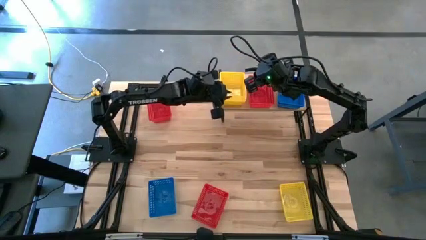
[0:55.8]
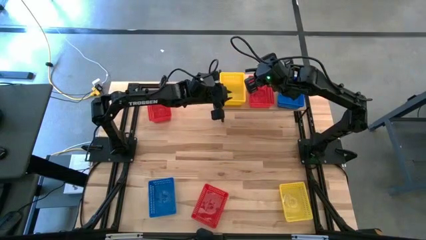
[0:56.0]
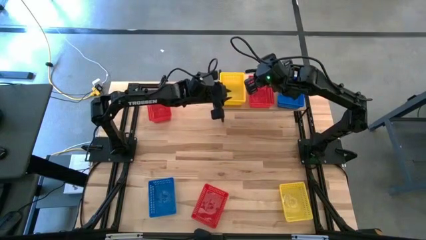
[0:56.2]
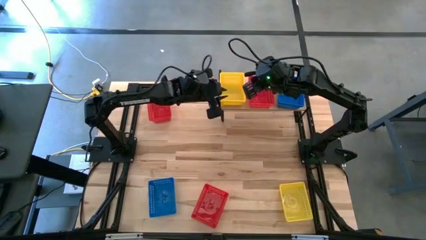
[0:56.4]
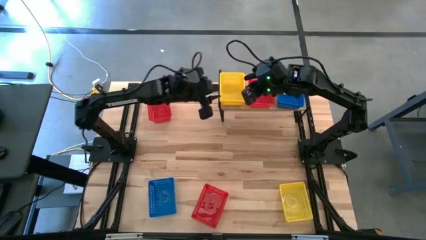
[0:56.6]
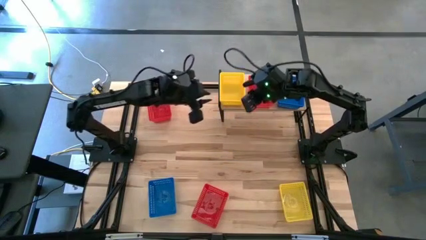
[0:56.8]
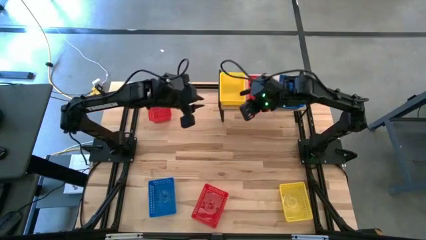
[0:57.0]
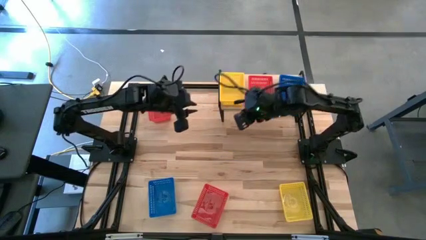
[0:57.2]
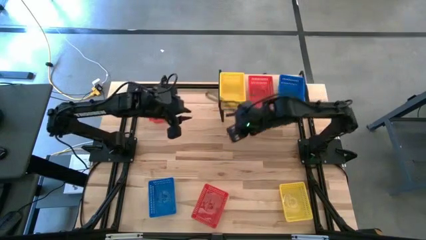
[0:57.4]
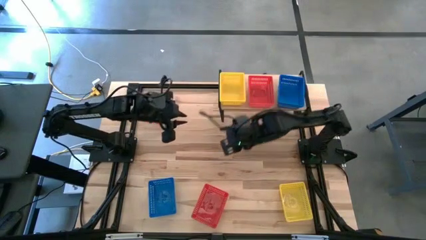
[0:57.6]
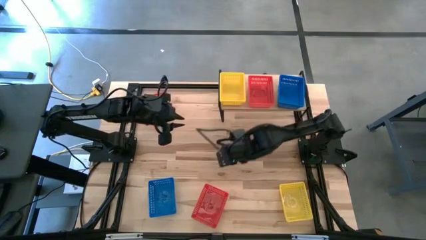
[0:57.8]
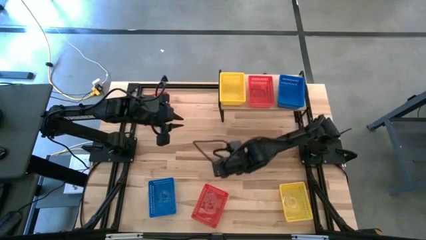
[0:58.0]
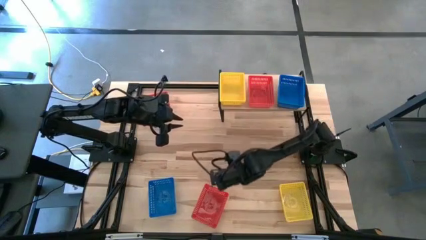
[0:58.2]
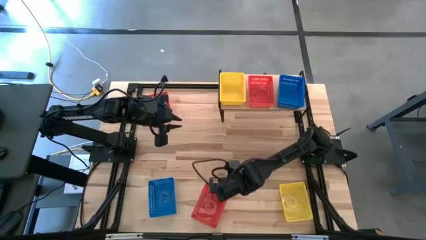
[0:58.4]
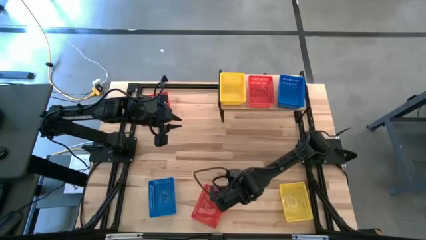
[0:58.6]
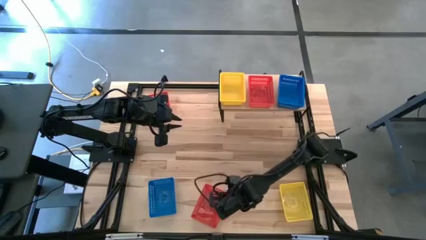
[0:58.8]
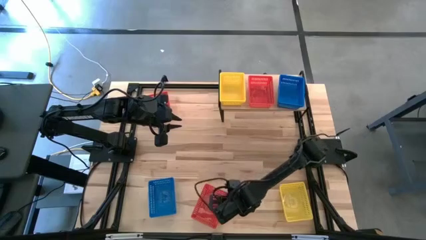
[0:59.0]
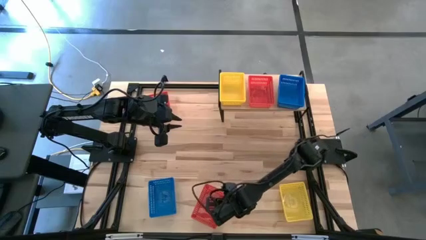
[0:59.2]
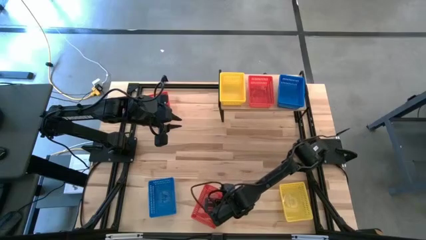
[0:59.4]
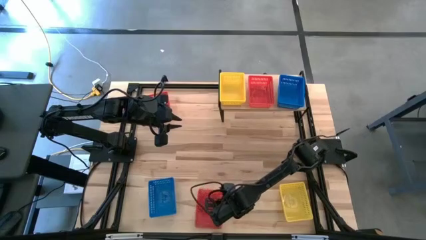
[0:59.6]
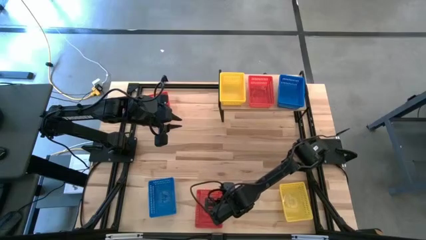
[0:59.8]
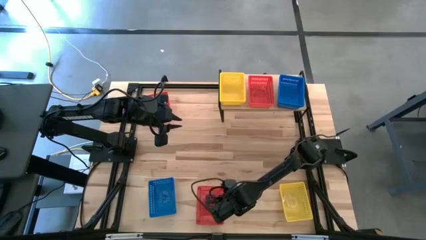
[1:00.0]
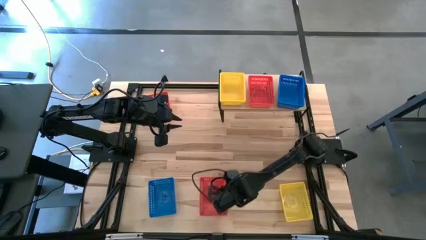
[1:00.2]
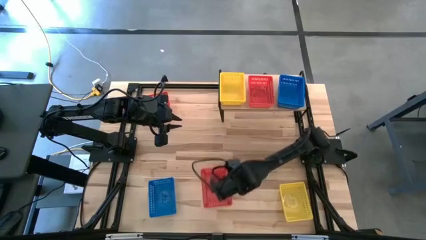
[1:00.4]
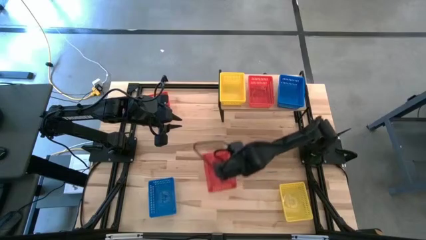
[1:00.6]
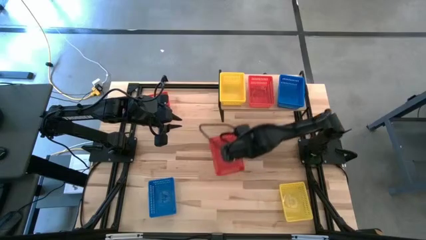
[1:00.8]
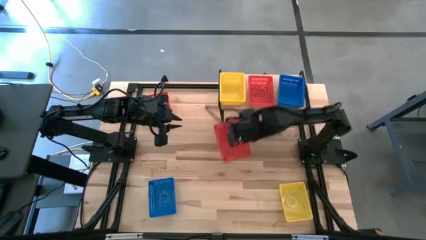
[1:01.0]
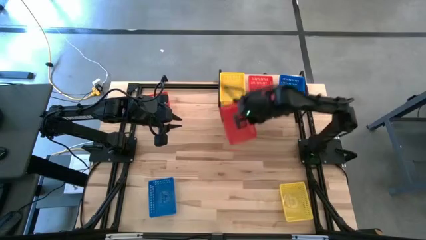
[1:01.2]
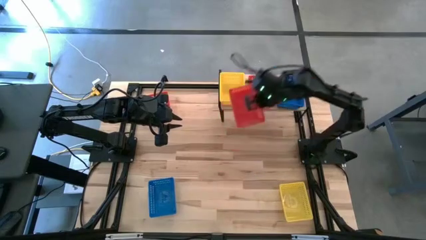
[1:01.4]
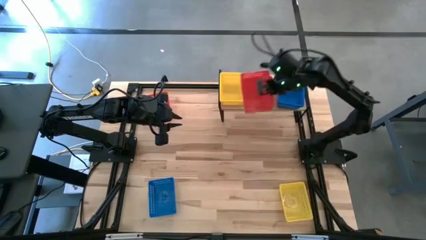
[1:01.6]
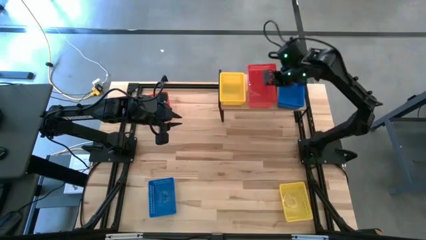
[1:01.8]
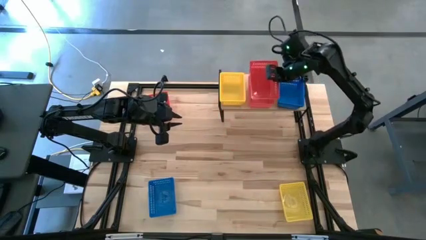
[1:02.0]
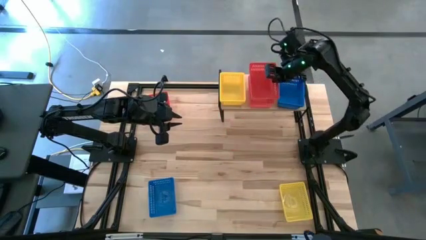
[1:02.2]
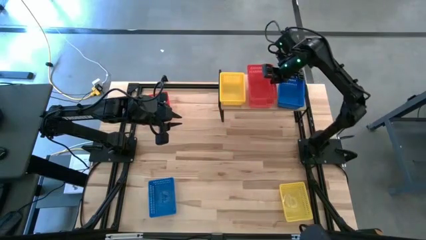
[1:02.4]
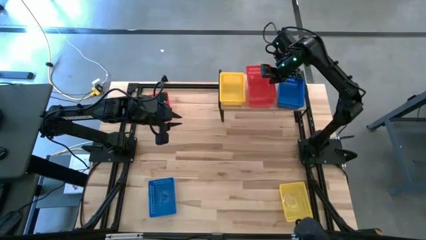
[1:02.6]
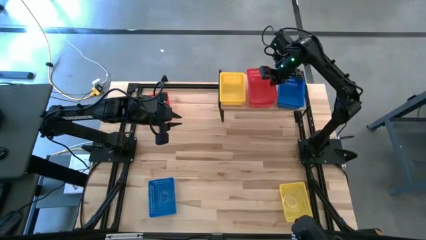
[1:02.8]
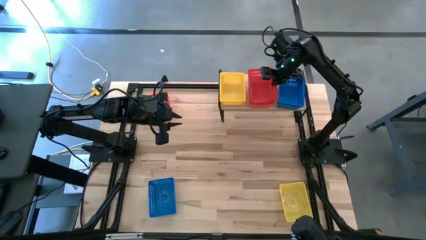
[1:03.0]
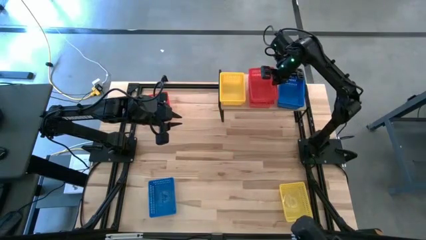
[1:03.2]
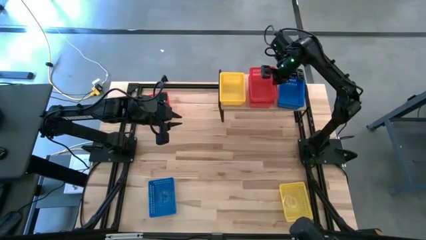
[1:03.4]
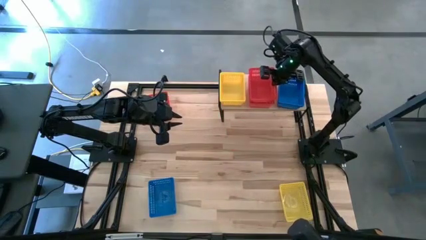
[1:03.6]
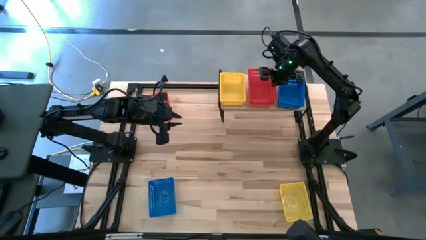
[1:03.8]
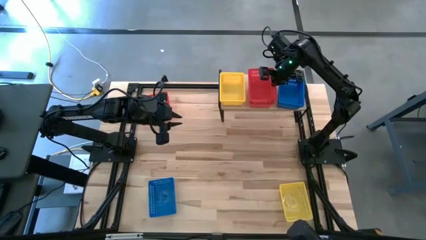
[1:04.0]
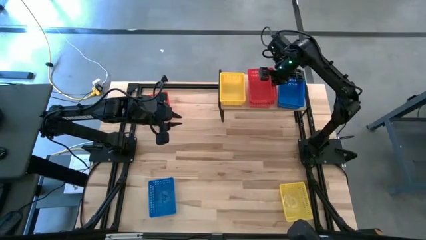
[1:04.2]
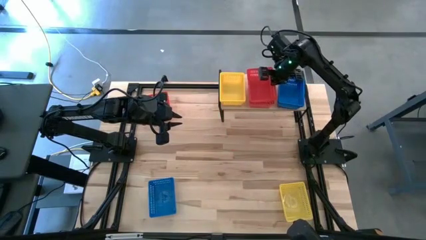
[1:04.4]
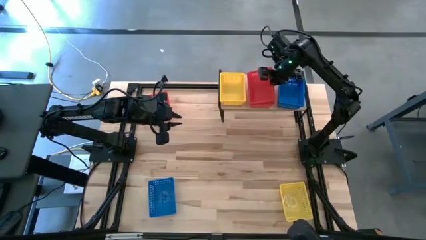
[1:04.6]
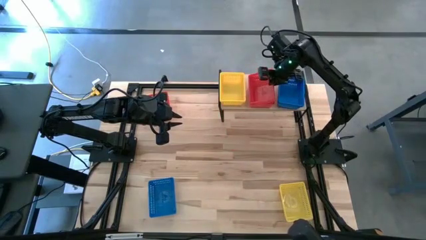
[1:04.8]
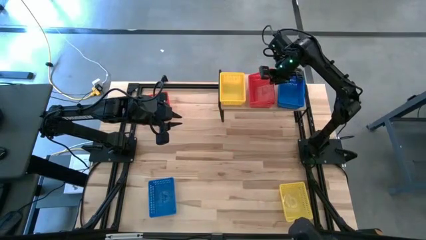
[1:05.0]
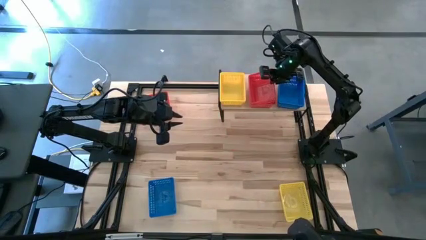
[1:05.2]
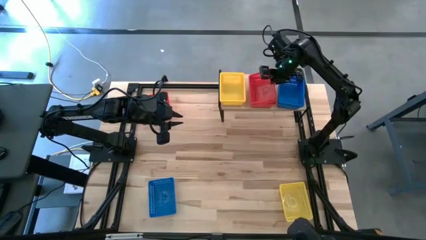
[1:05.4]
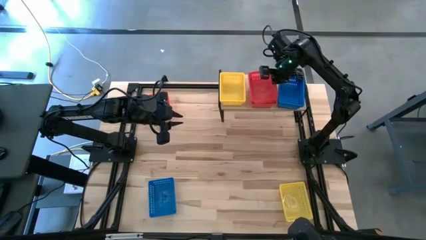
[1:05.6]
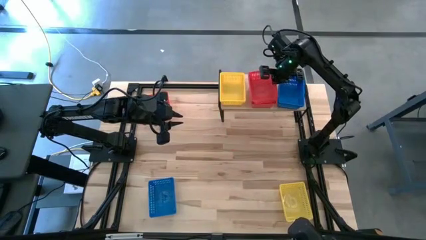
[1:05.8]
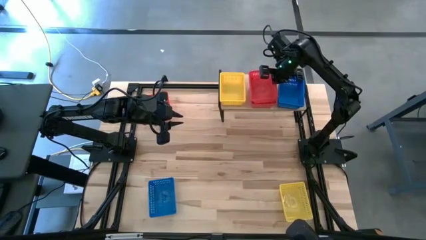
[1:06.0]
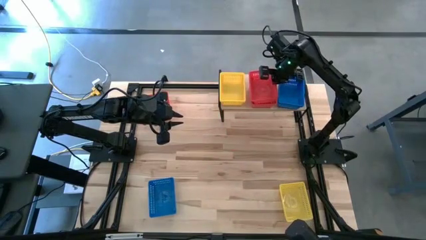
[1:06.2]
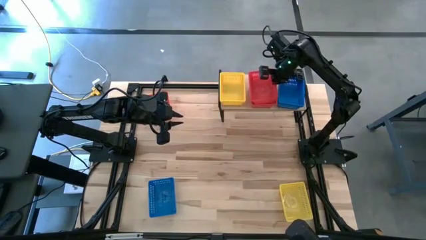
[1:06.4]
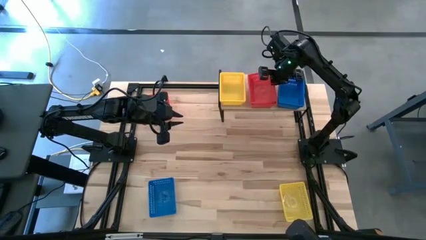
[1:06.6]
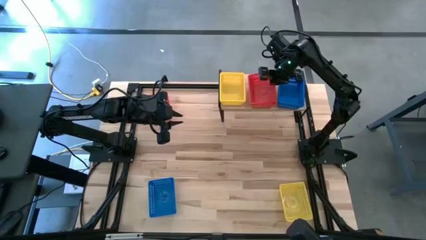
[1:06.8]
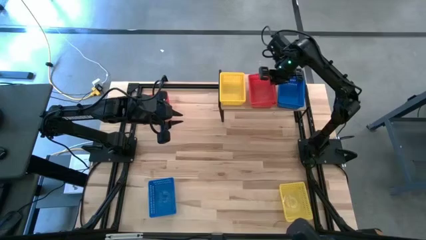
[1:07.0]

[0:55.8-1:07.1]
Task: Stack baskets on shelf by color
Stack the bottom red basket on the red basket on the shelf
